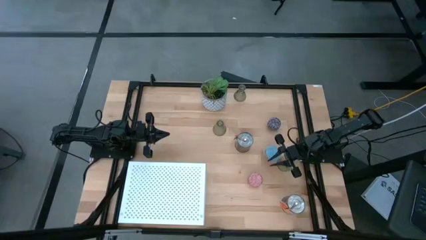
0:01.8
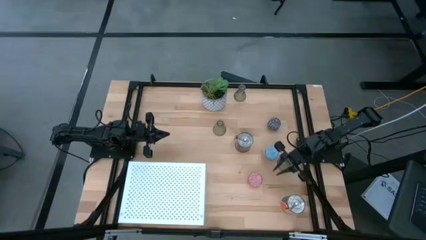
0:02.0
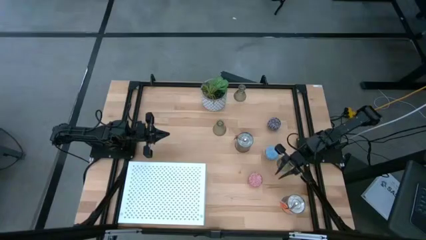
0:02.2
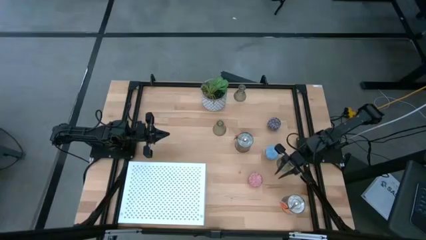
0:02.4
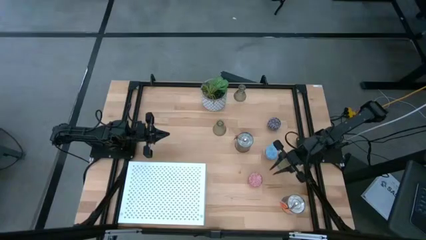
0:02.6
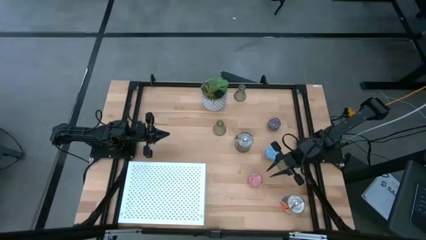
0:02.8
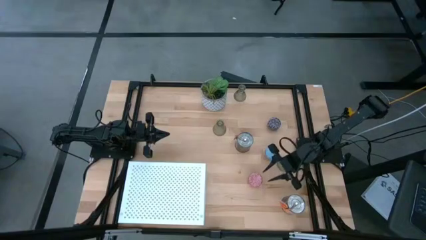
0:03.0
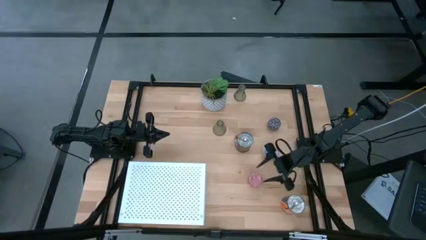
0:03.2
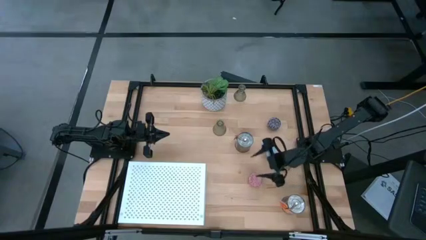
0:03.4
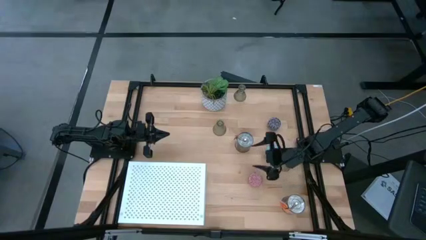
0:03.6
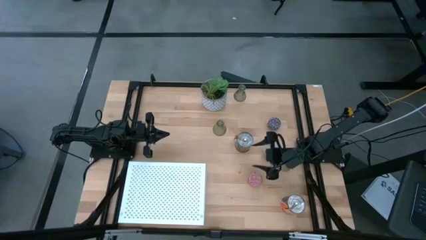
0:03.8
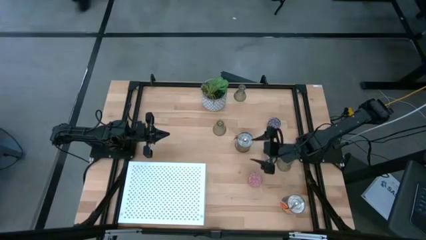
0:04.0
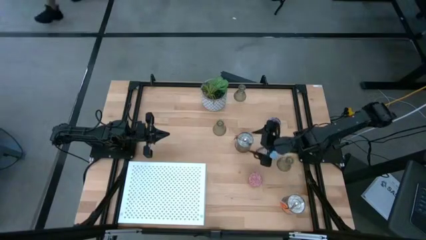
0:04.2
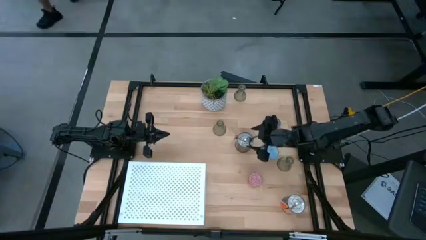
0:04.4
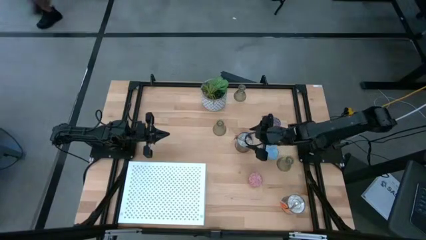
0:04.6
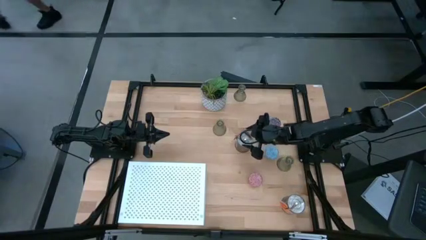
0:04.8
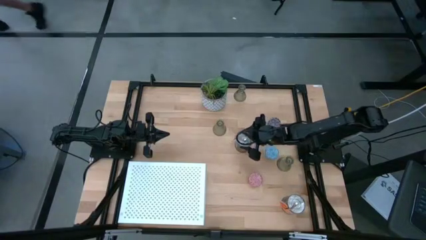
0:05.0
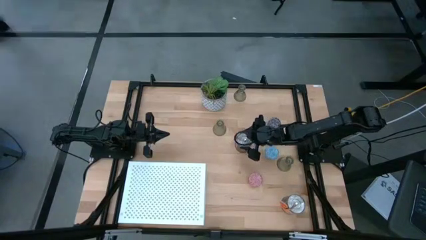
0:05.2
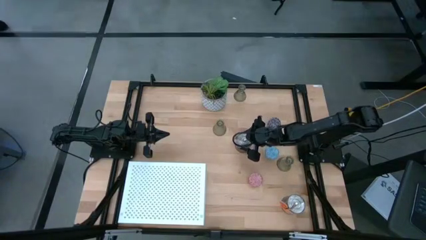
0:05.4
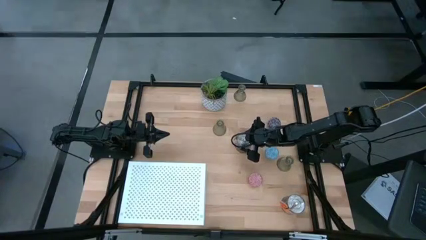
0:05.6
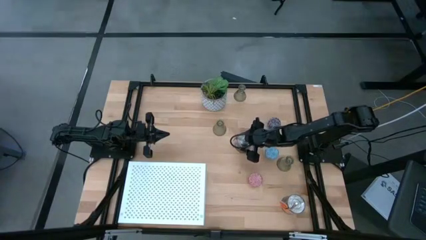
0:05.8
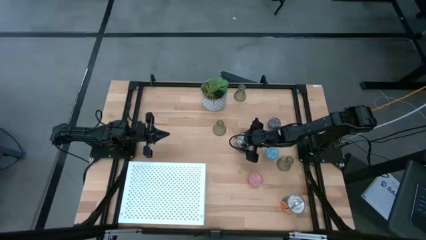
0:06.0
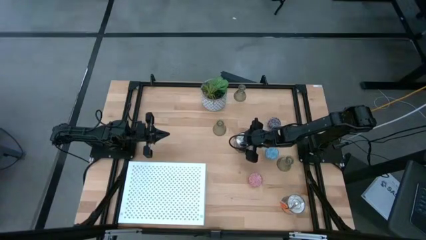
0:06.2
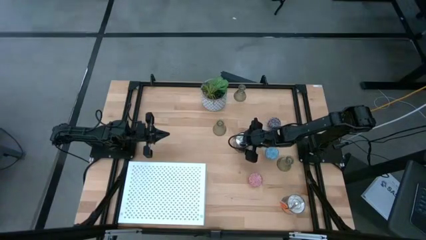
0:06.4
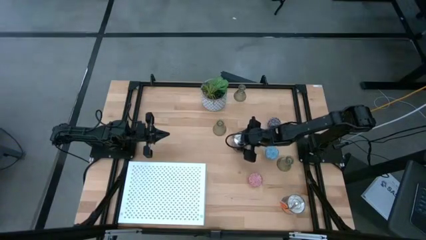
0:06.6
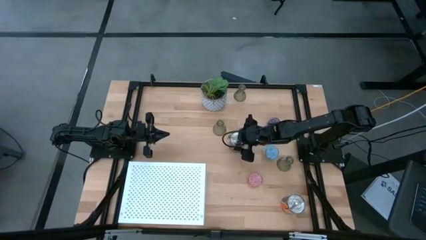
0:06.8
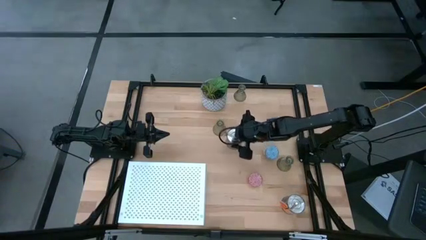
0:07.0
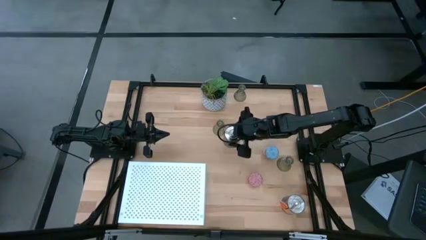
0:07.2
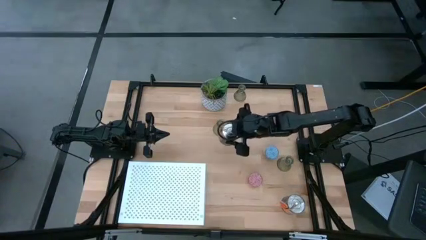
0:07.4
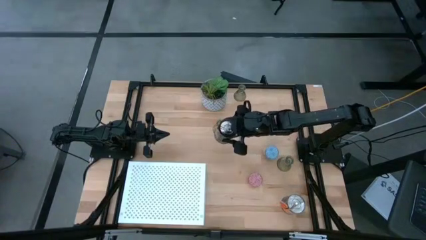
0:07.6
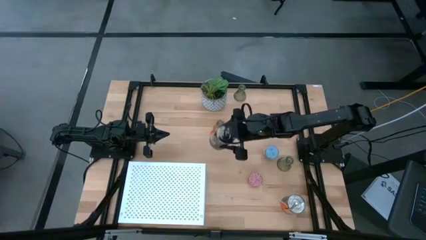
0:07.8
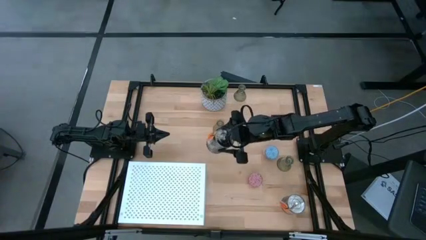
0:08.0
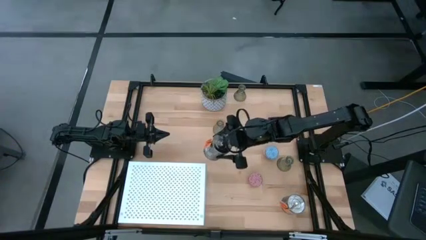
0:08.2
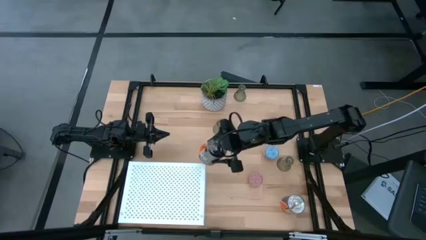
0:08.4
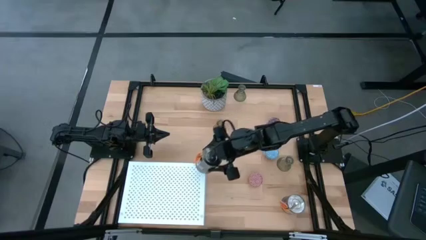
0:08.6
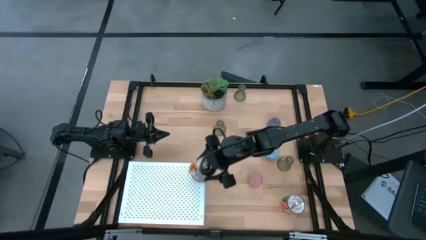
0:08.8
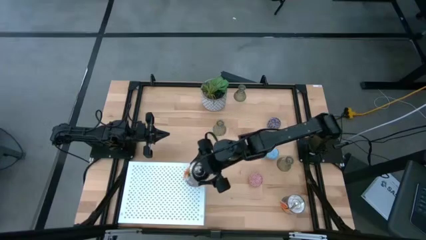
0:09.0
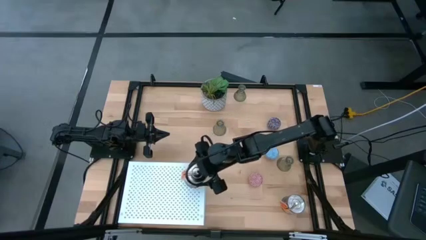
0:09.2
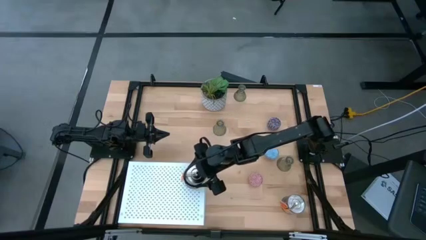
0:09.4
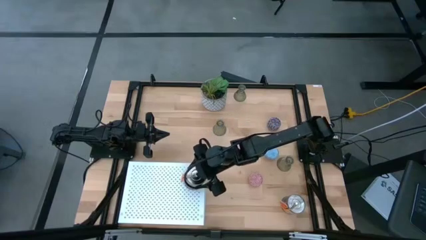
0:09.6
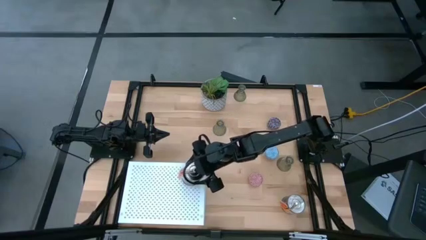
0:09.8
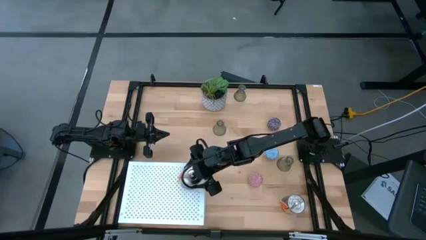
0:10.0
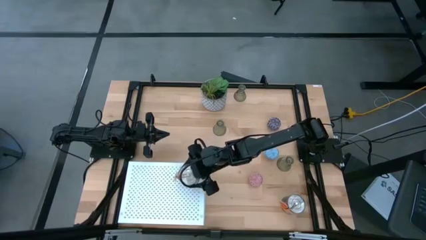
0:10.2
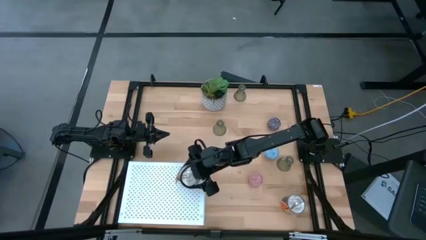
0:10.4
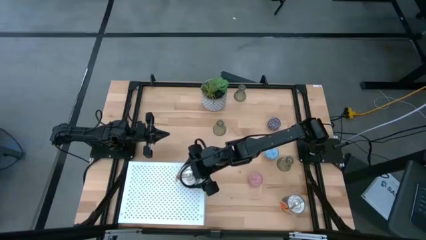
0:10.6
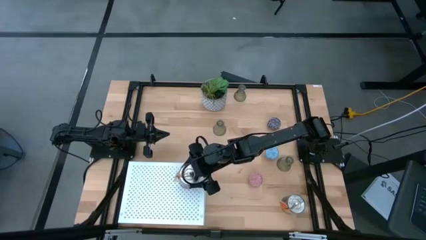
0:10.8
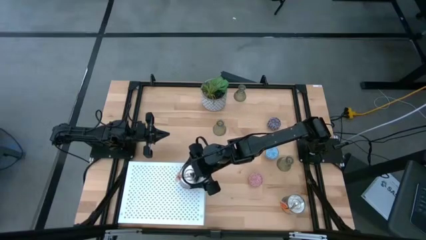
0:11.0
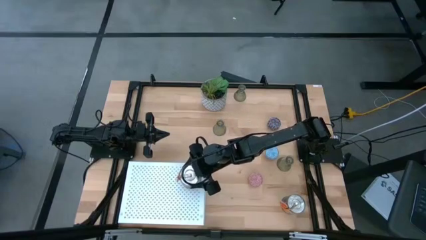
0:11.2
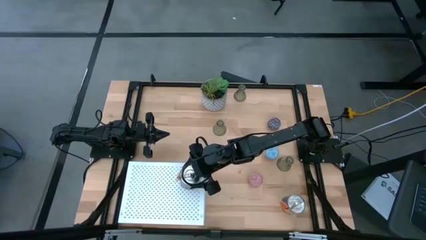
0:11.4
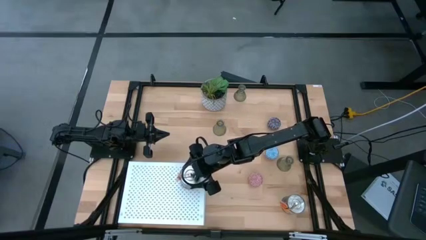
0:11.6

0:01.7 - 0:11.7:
Task: Pick & Place candle stick holders
Put the top silver scented candle on the shelf

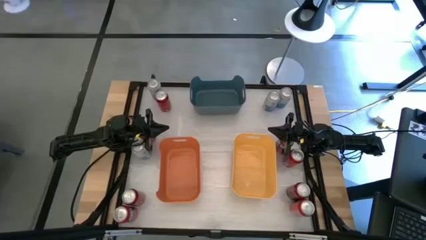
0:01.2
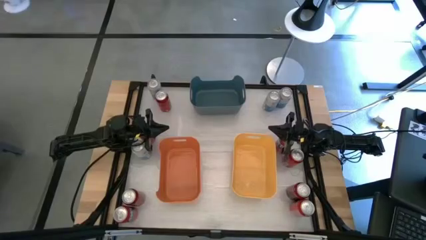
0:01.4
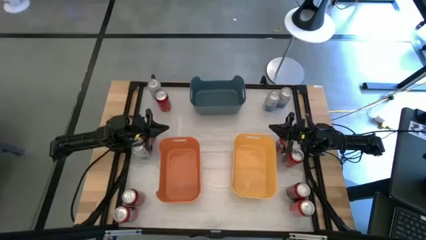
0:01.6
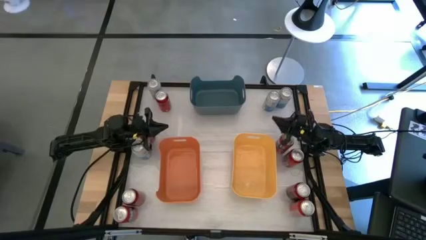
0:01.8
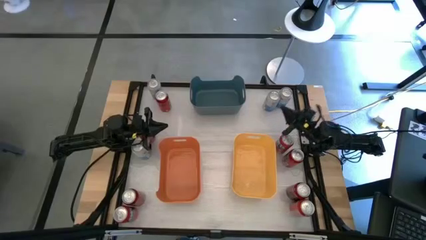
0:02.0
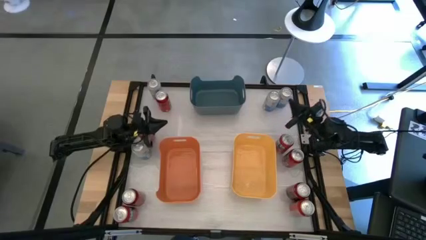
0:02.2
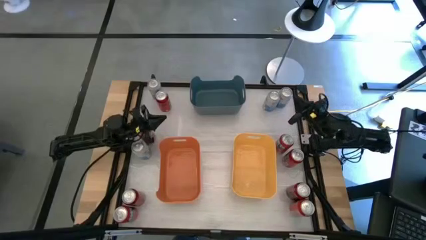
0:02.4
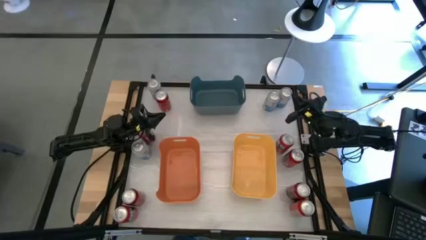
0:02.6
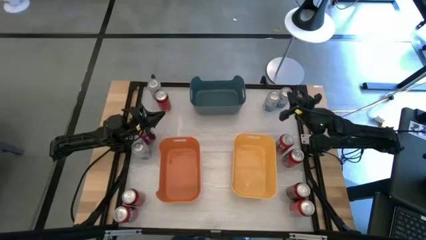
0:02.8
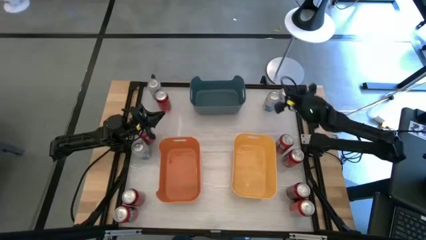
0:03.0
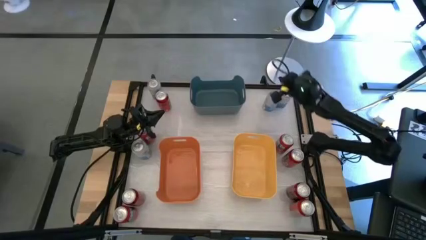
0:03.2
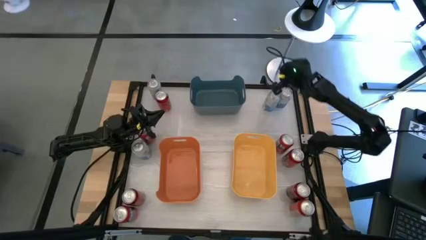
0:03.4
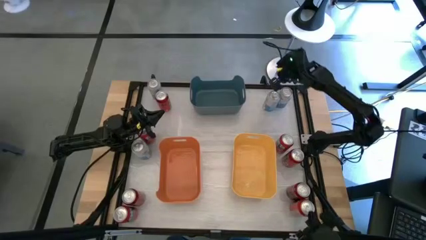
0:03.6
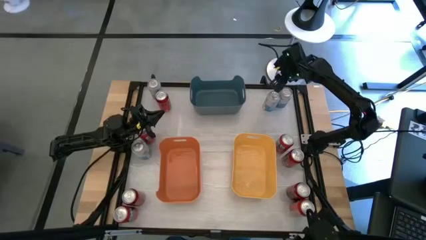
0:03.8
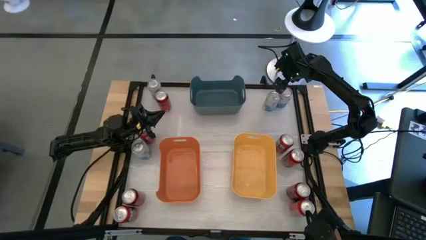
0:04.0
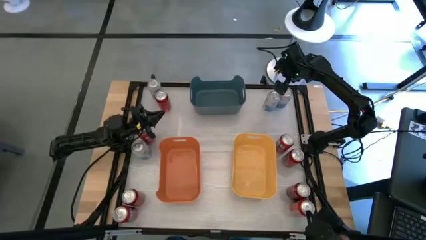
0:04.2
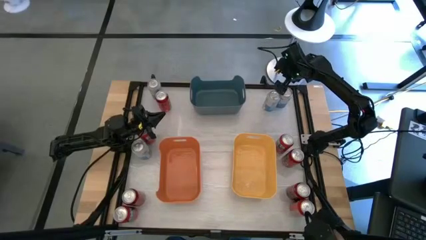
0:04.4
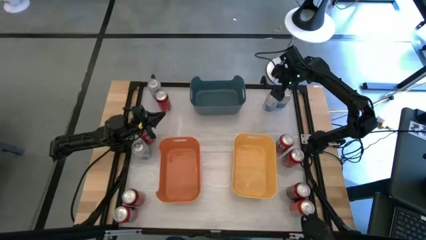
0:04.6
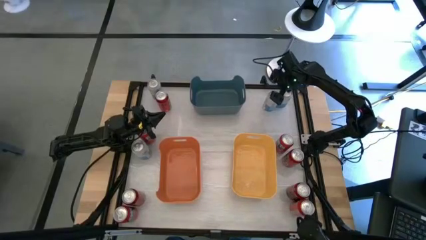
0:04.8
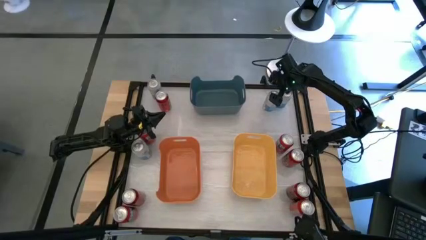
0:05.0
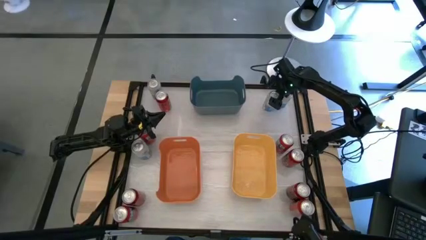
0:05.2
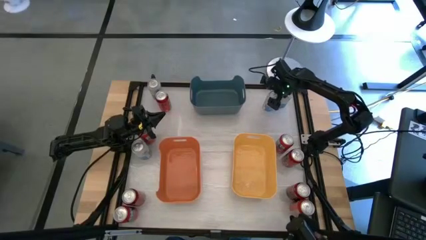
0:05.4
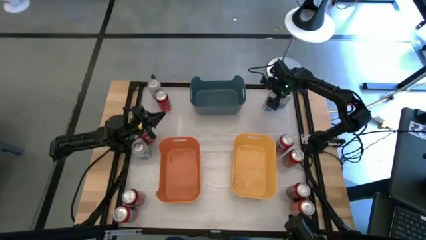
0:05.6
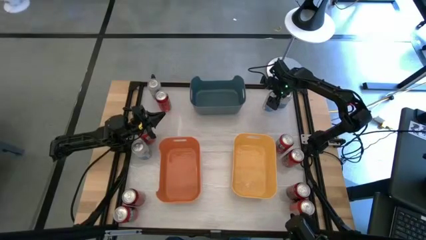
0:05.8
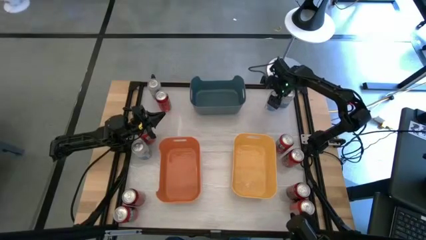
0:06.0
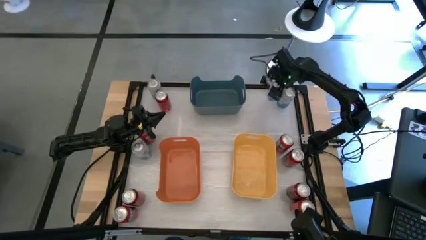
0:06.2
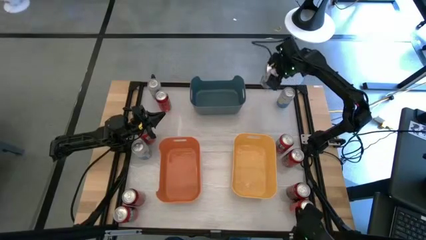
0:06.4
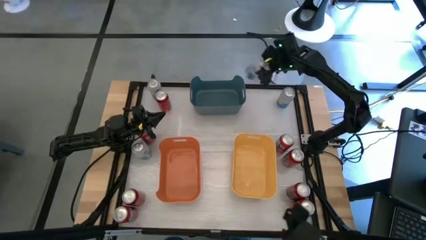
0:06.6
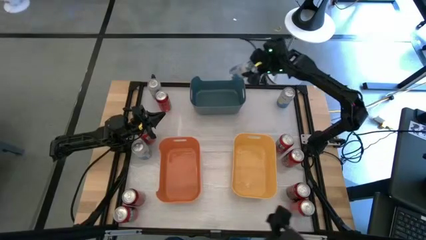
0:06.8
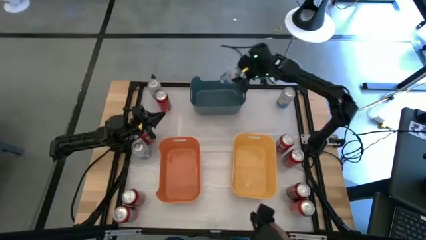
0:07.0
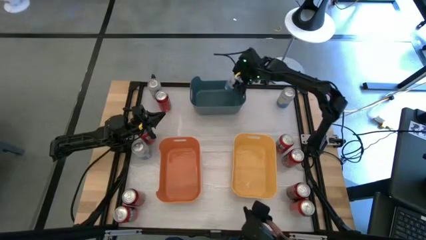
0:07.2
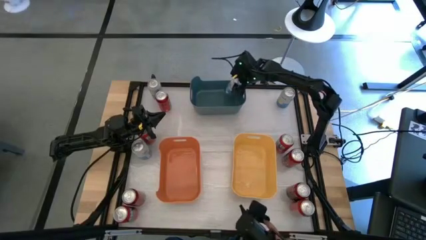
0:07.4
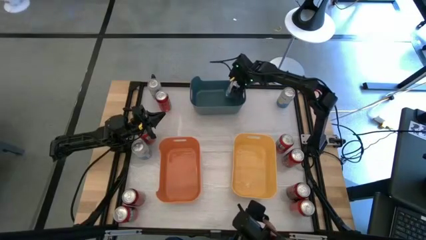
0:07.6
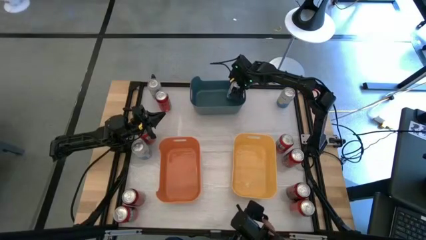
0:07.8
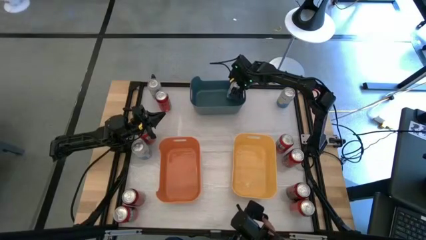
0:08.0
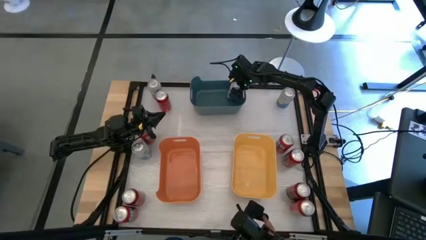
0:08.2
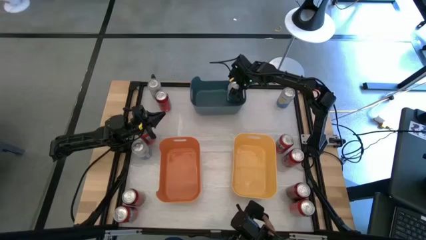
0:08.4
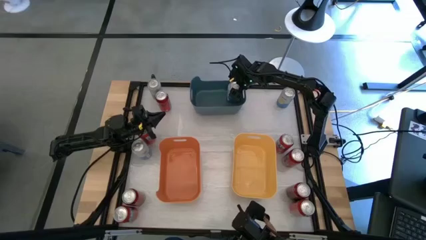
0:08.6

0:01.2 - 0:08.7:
Task: Sort soda cans
Put the top right blue-white soda can into the green bin
